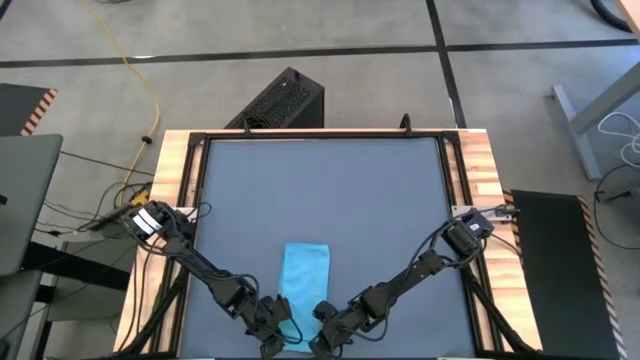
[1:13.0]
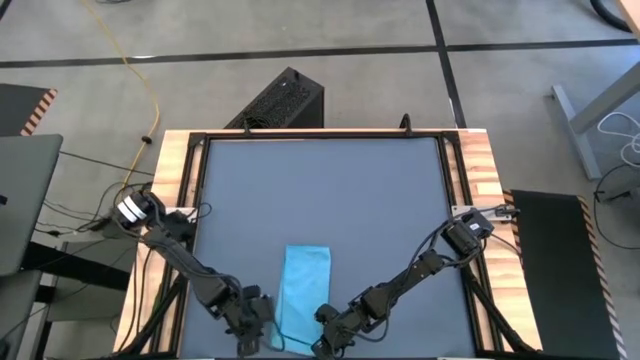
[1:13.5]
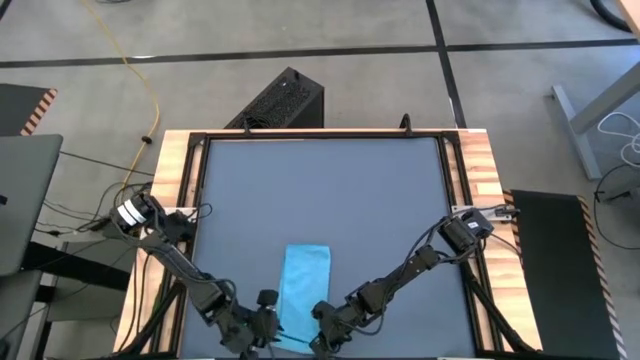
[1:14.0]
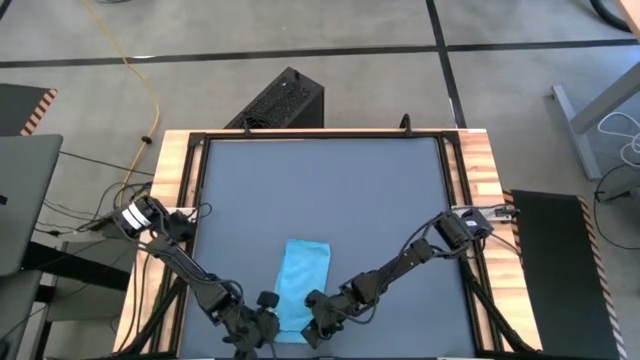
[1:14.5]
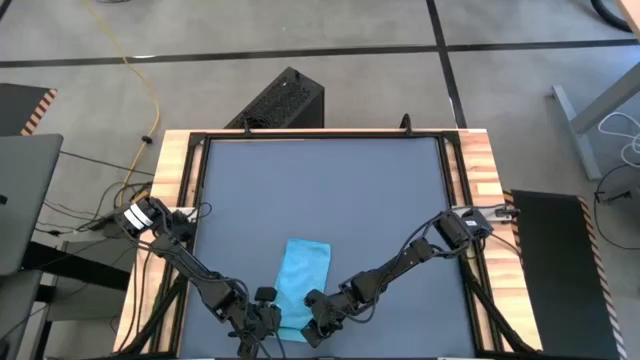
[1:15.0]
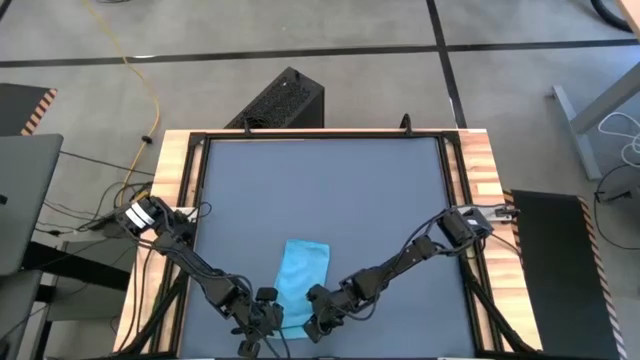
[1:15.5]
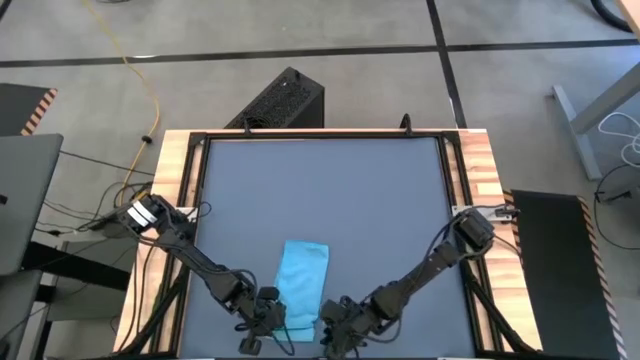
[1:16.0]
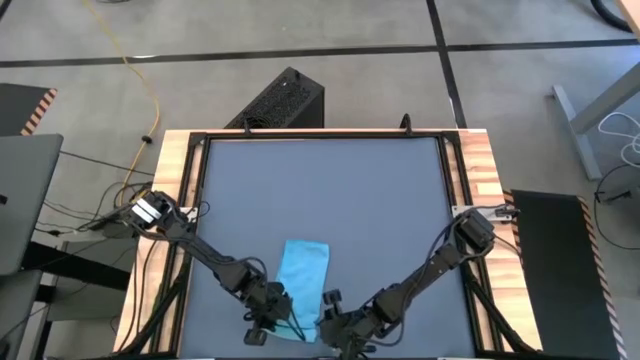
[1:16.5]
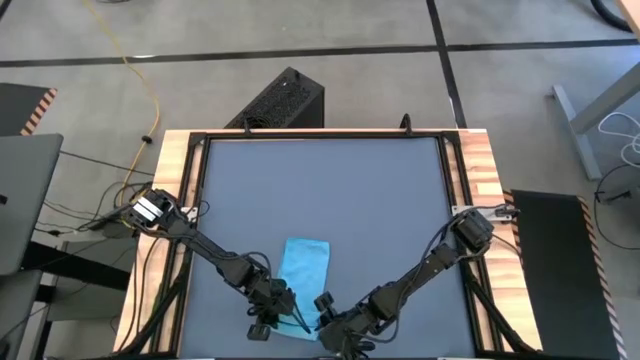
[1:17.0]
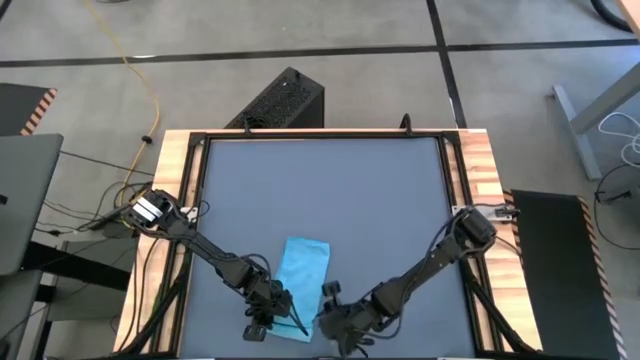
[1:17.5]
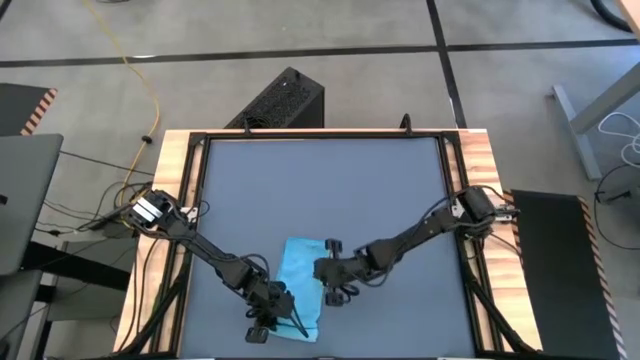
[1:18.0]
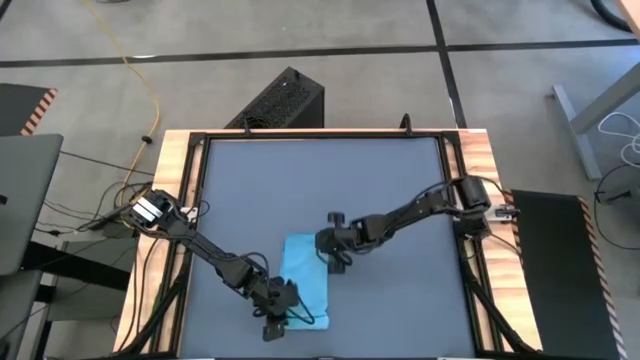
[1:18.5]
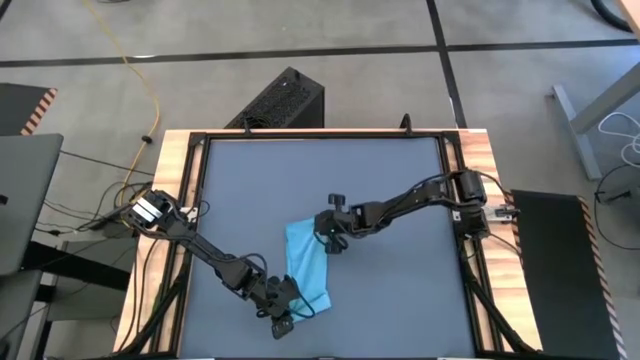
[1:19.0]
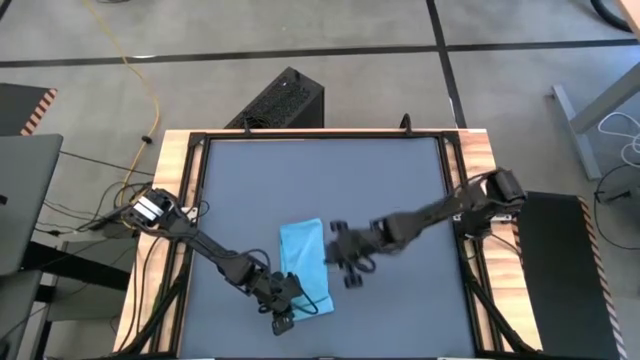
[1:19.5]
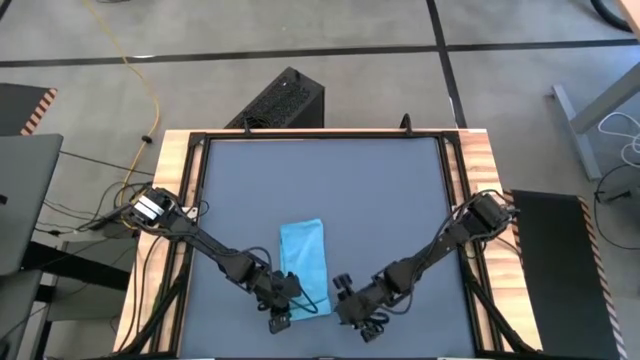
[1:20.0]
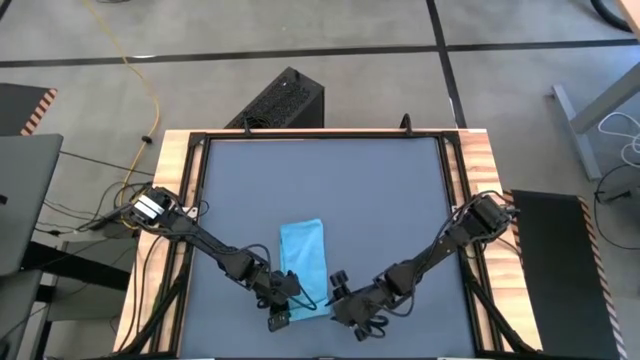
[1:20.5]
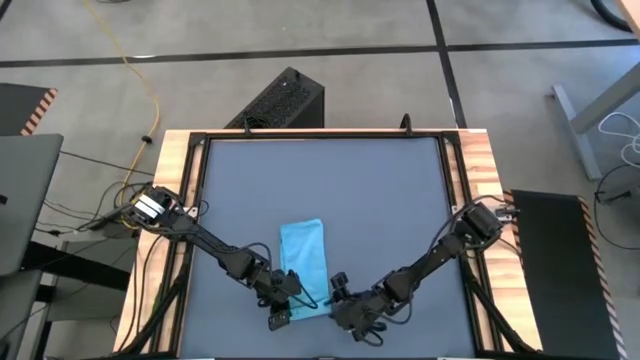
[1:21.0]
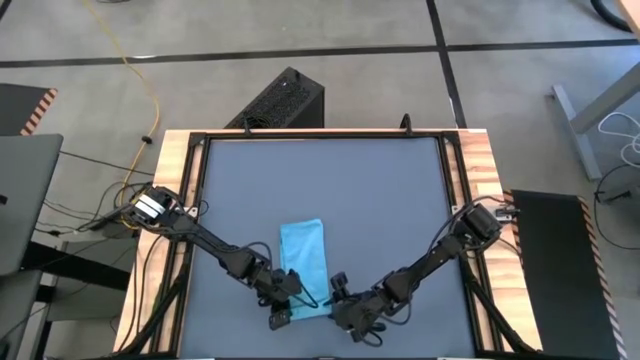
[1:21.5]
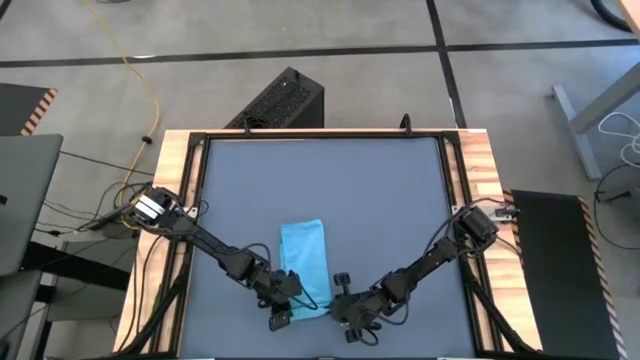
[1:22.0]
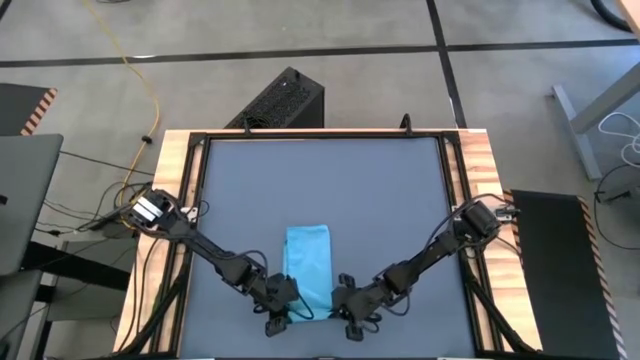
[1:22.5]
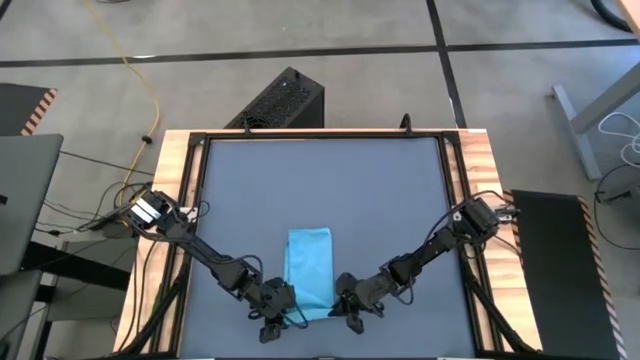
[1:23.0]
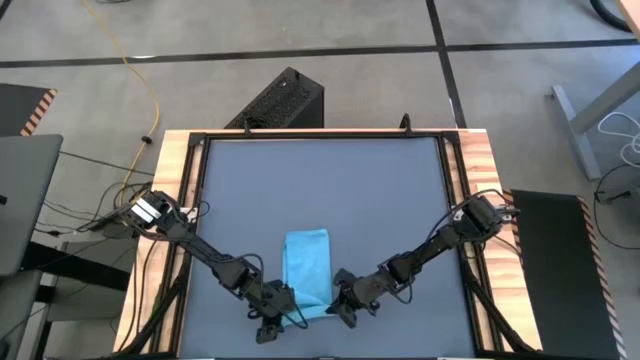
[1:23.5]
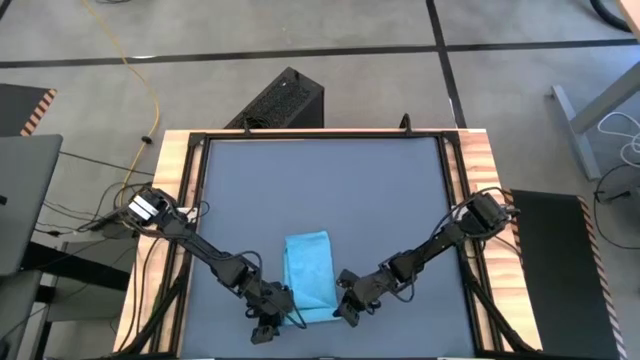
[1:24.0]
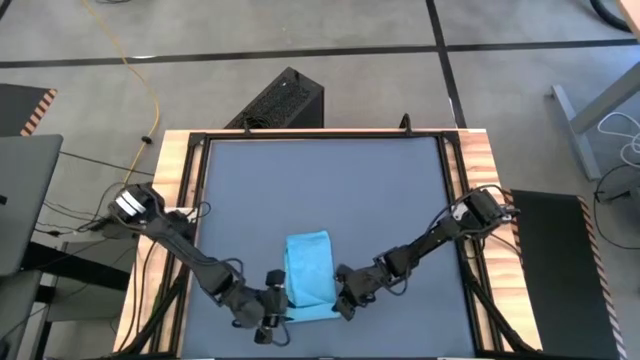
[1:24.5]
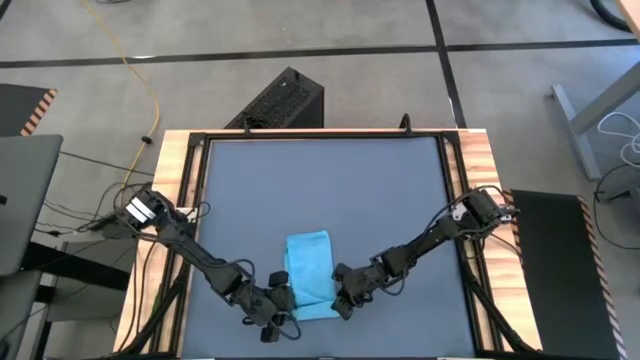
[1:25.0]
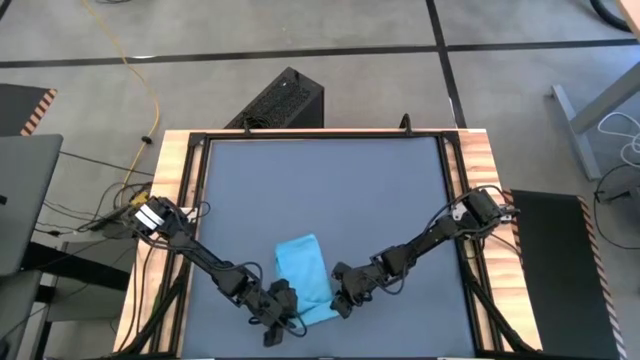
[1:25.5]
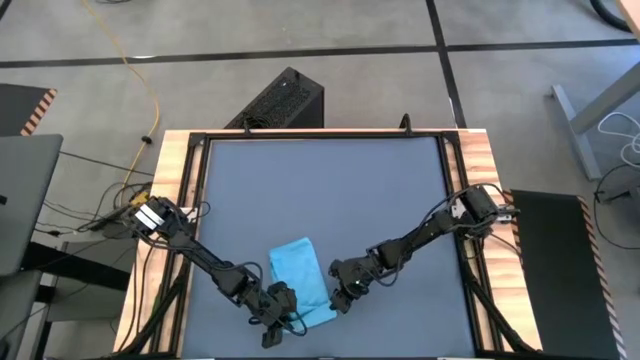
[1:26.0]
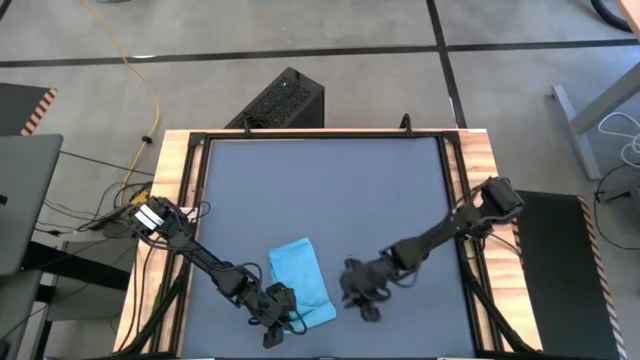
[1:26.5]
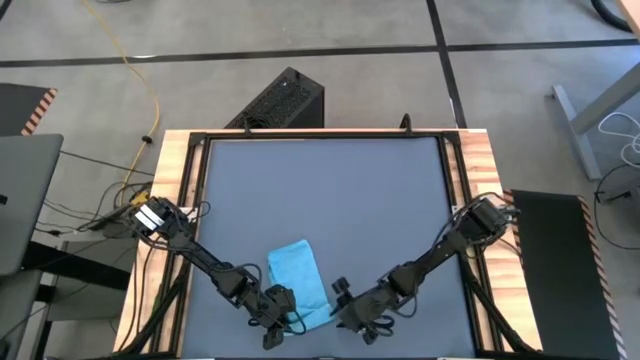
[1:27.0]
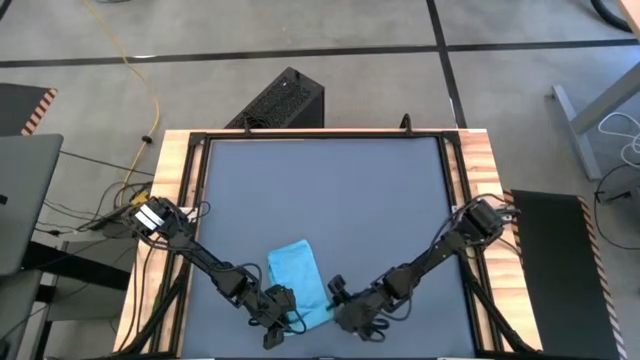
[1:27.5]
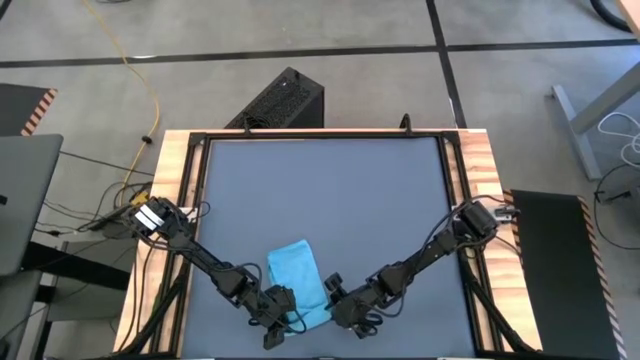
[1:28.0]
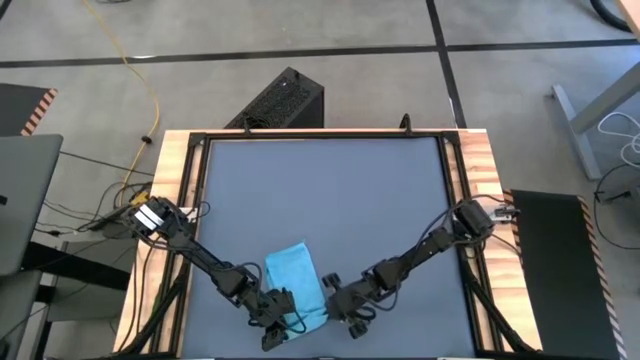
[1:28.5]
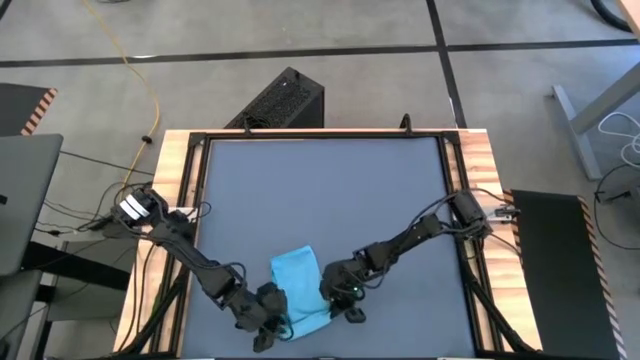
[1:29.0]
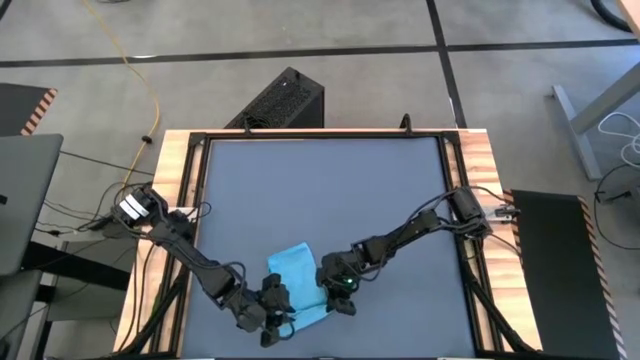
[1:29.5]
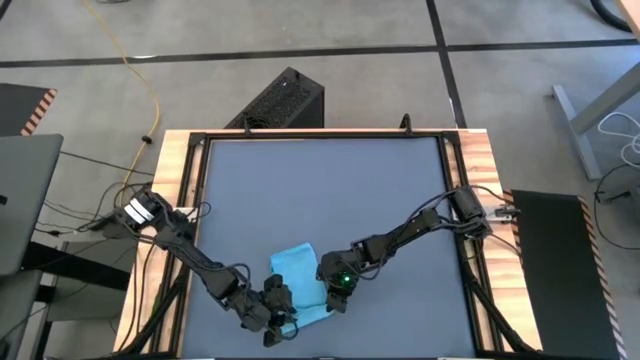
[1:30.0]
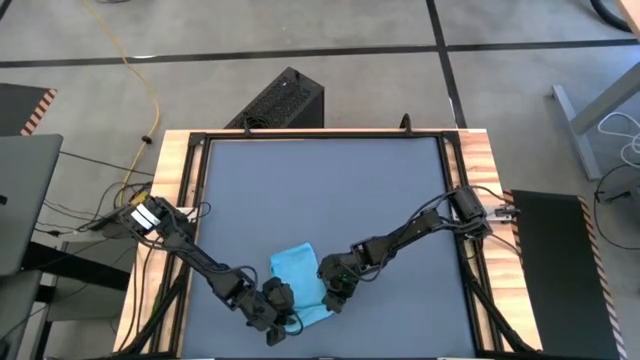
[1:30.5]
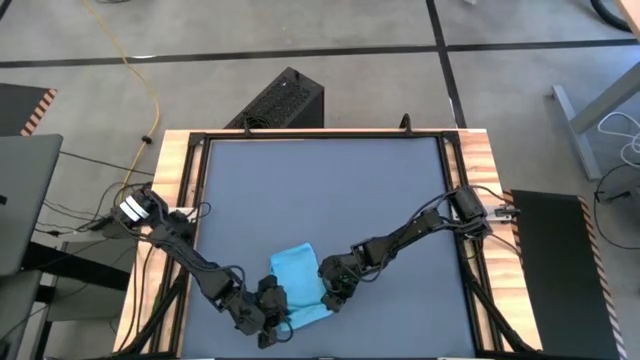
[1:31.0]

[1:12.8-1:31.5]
Task: Roll towel
Roll the blue towel

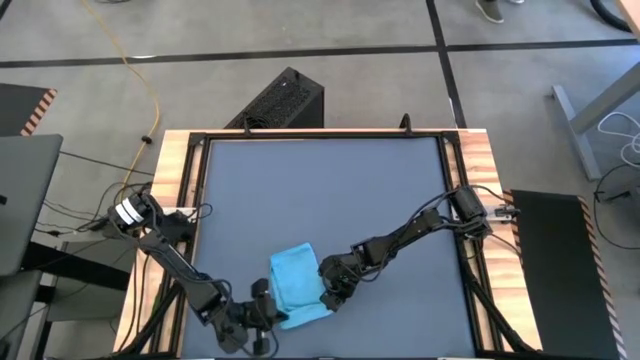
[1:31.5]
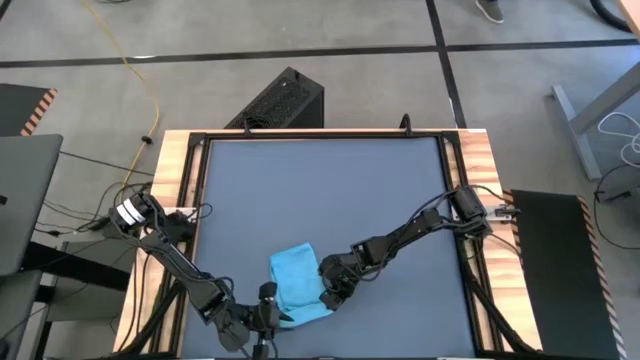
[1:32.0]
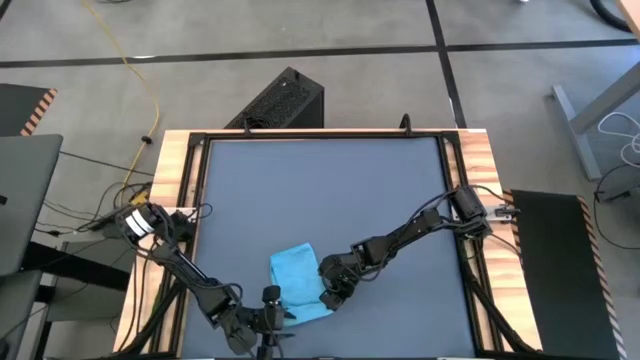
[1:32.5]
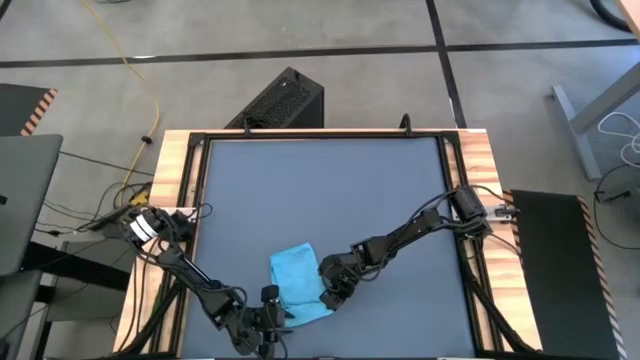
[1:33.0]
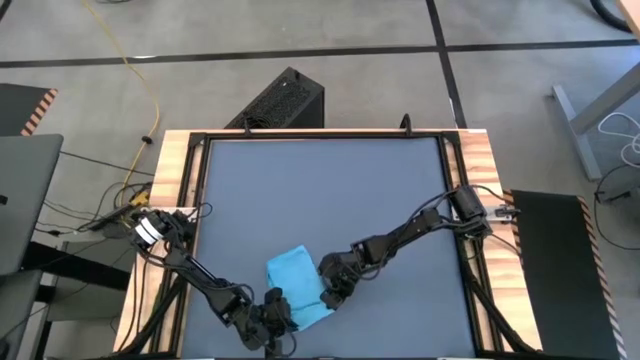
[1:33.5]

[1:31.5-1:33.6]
Roll the blue towel

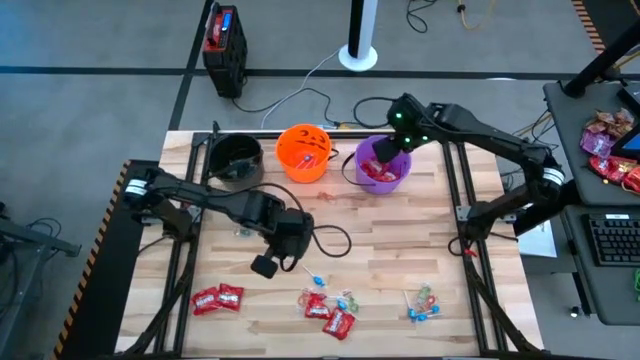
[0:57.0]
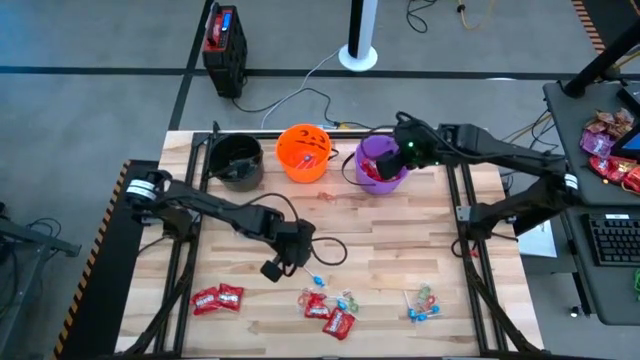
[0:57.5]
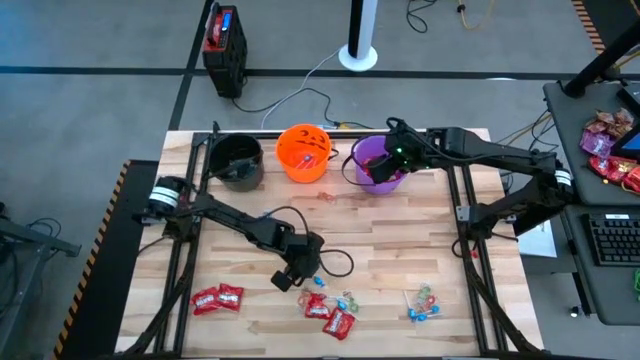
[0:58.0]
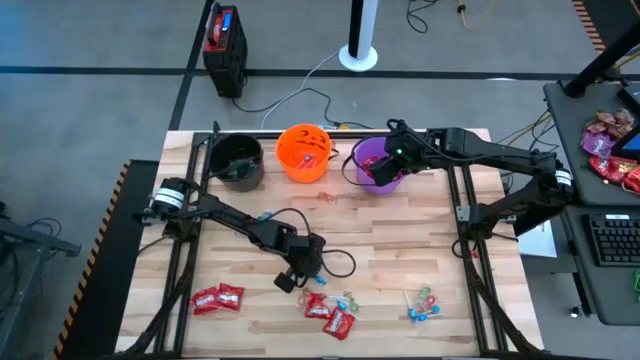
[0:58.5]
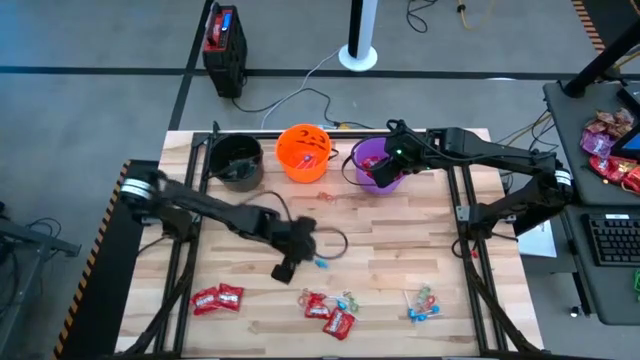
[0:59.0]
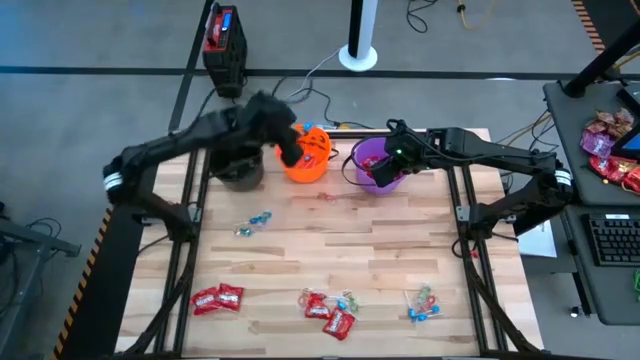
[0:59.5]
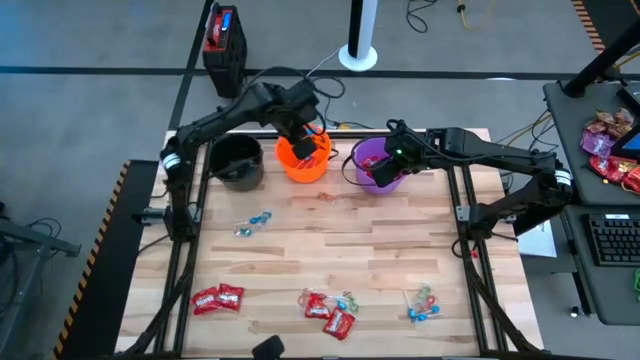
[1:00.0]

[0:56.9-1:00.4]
Task: Sort candy by brand, put in halloween buckets
Put the blue candy into the orange bucket
